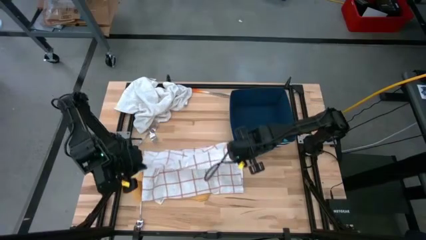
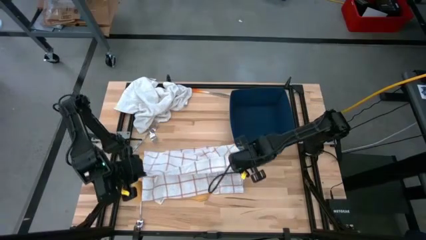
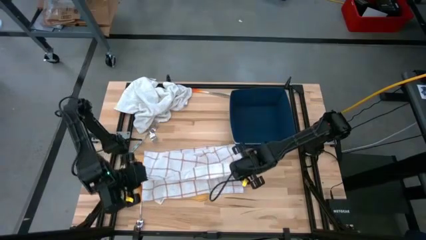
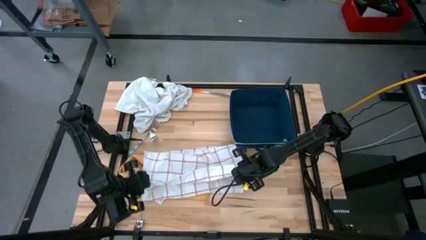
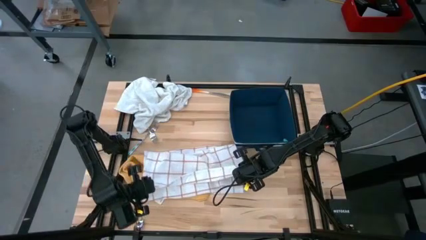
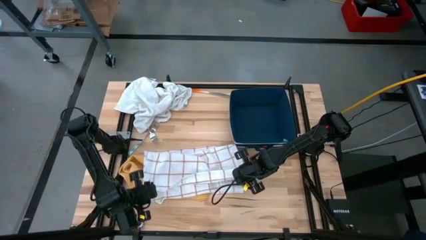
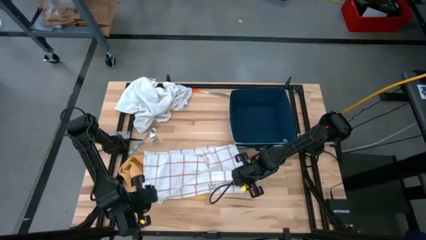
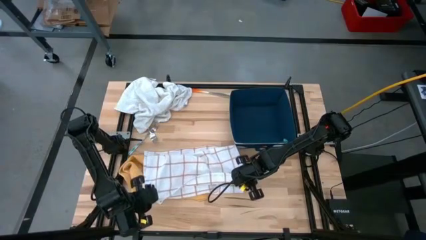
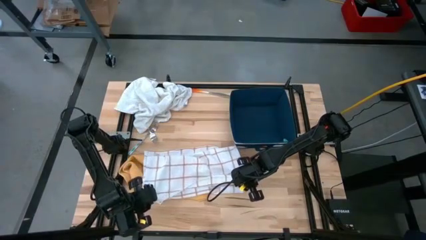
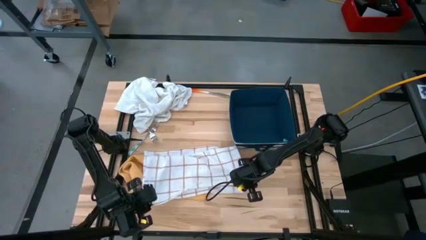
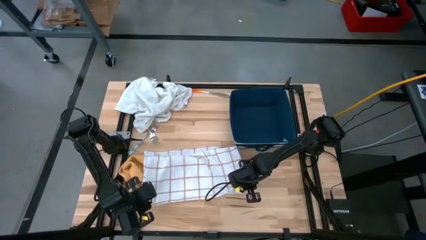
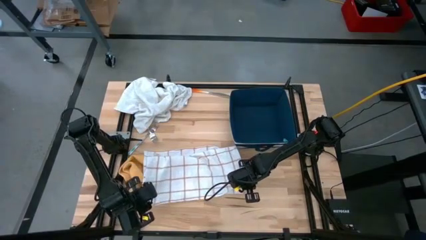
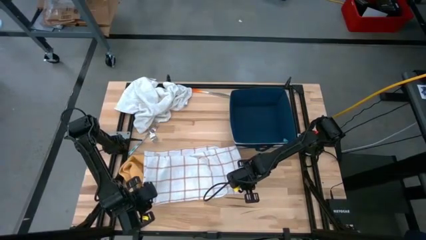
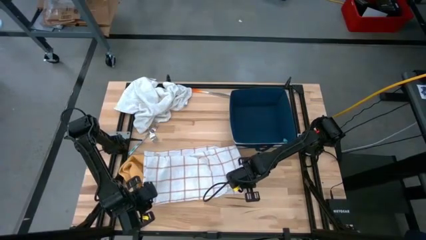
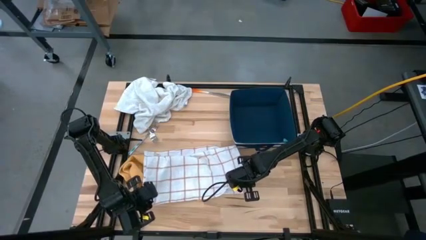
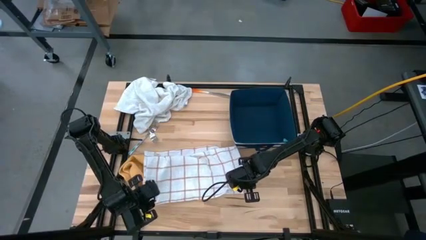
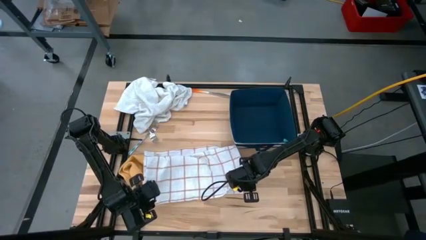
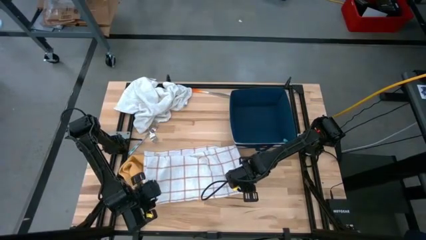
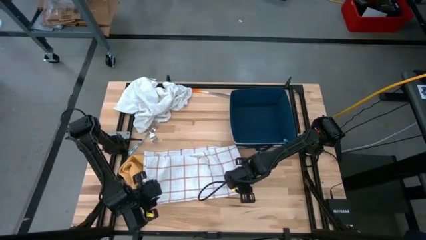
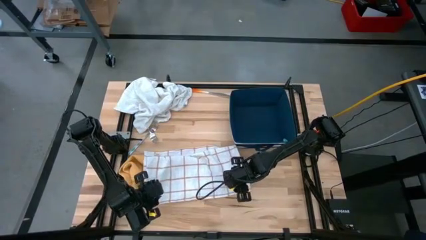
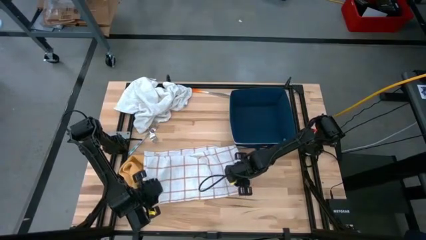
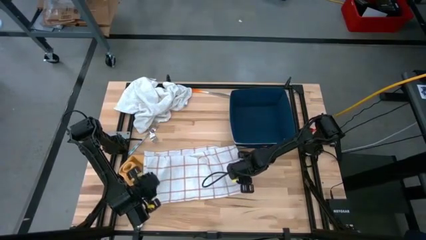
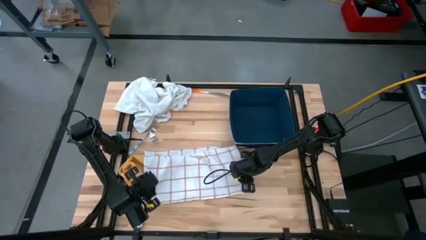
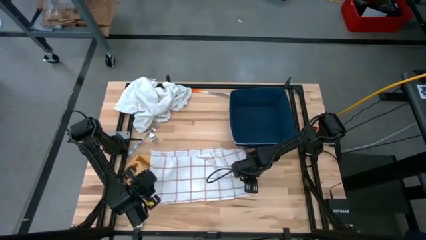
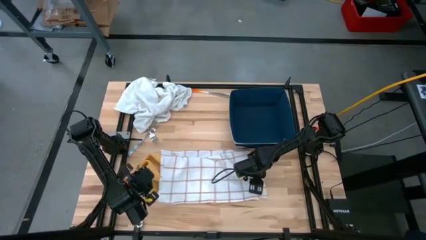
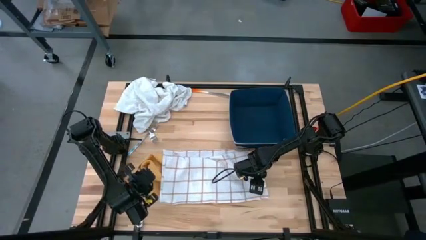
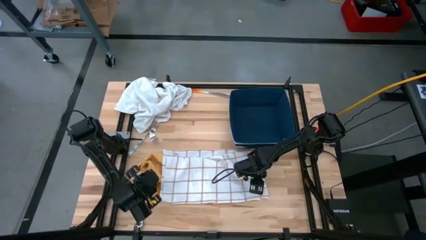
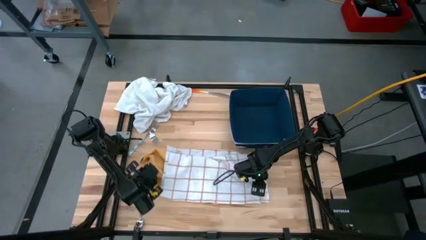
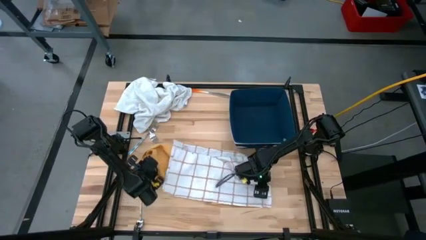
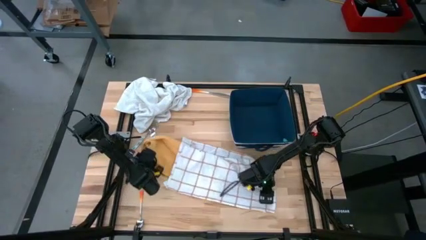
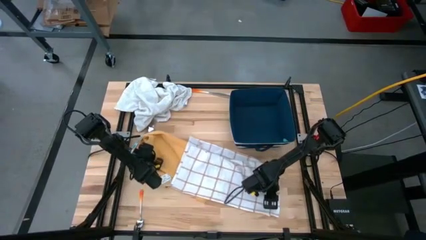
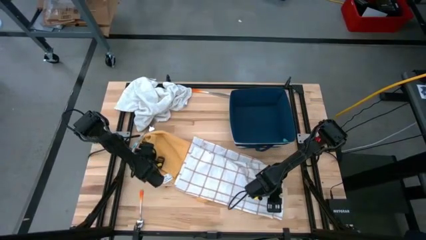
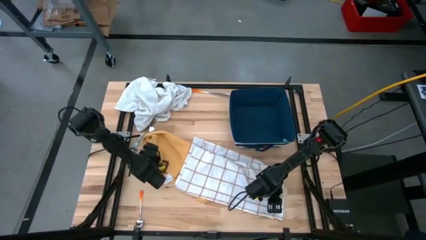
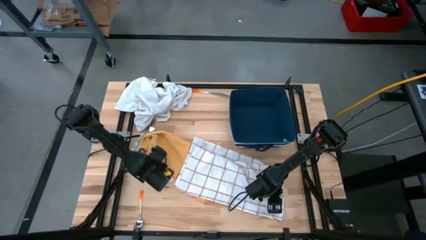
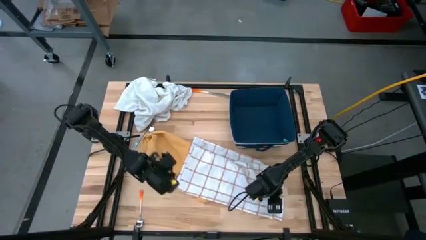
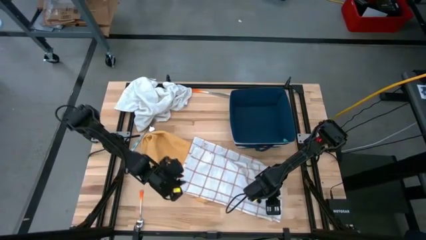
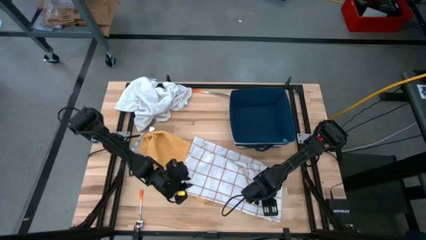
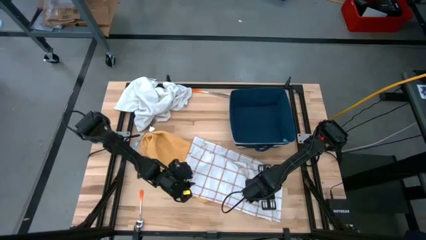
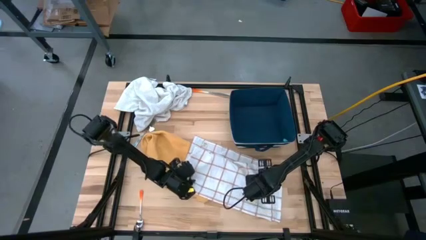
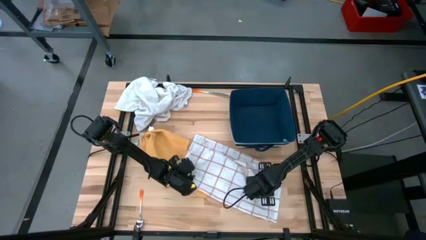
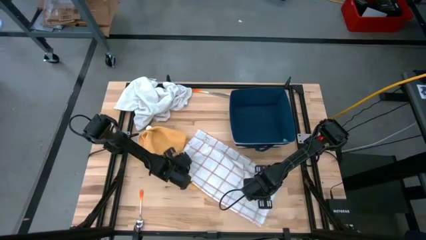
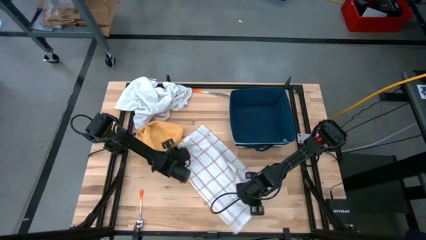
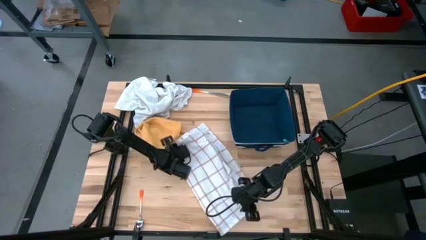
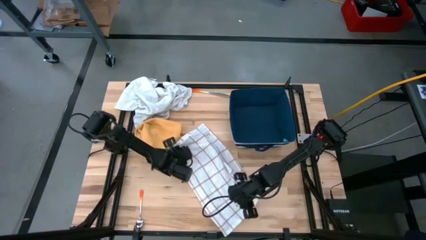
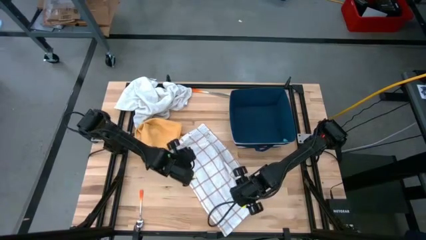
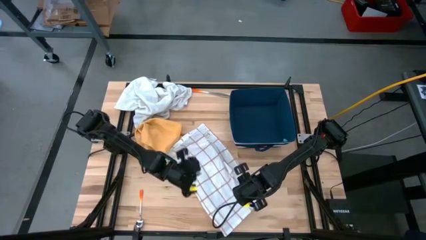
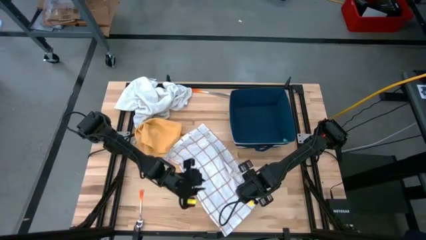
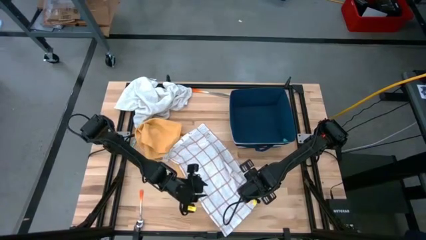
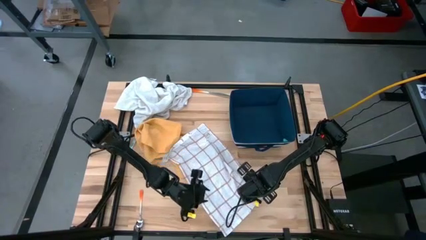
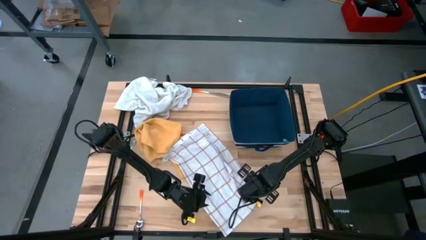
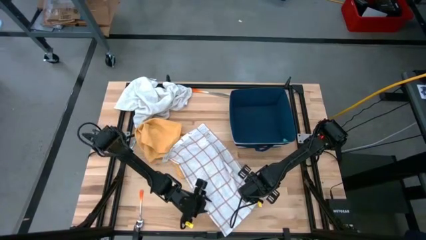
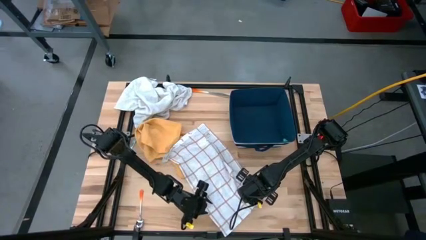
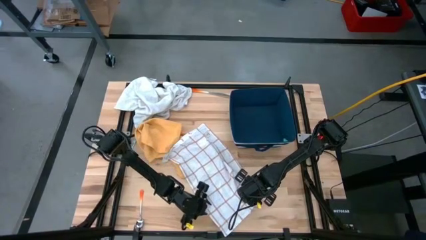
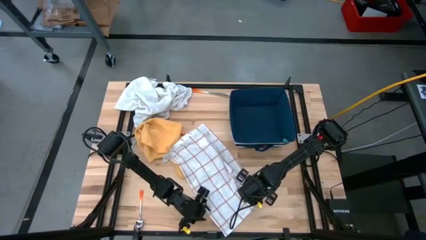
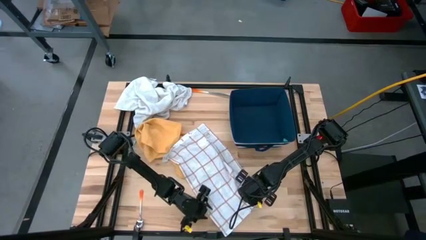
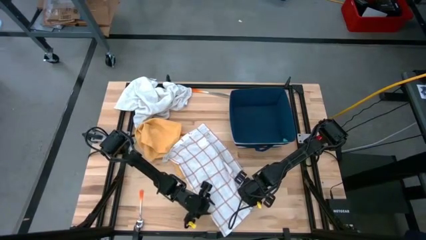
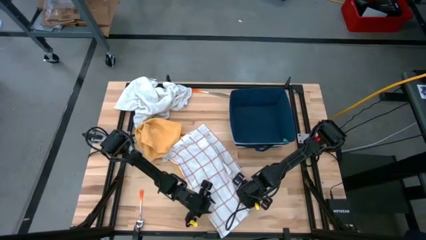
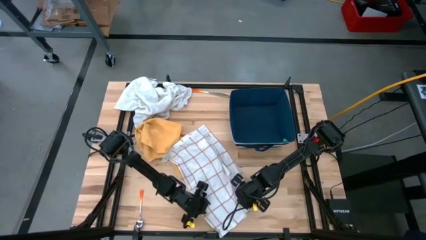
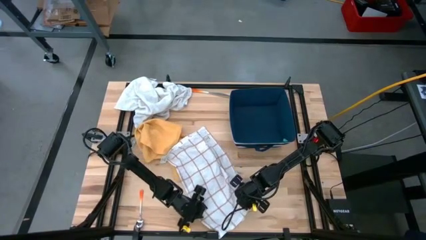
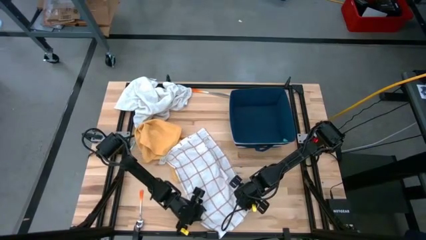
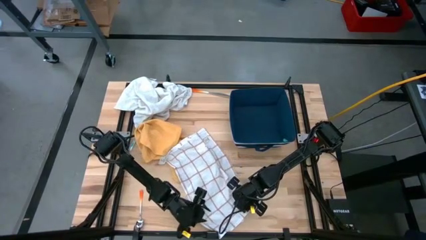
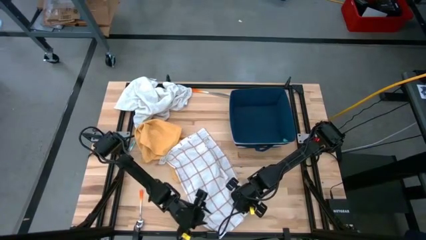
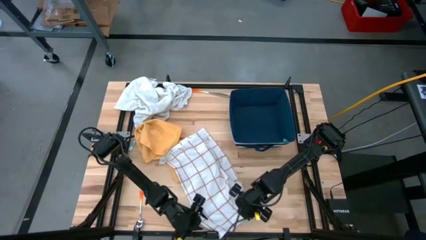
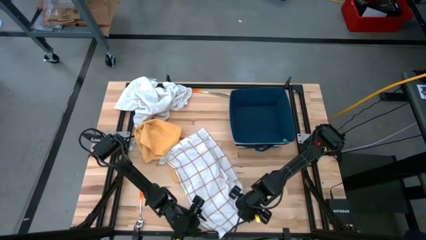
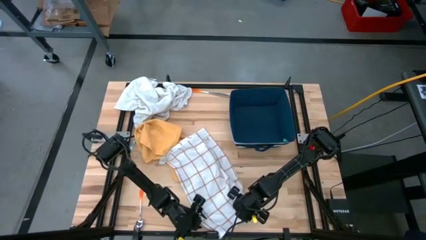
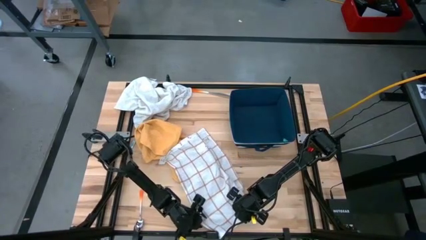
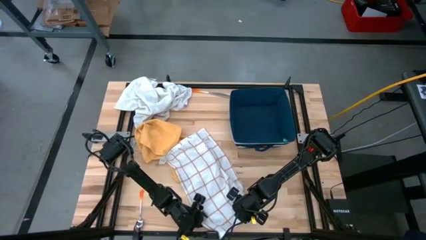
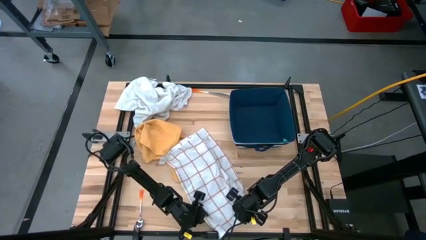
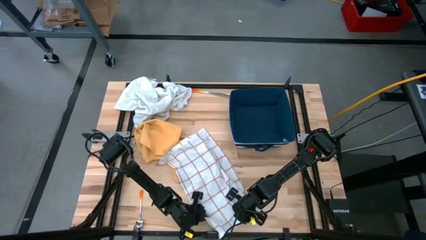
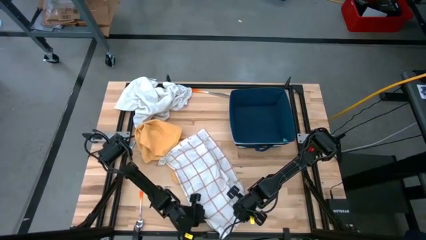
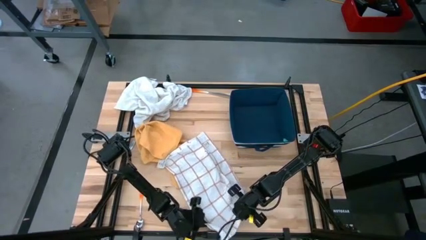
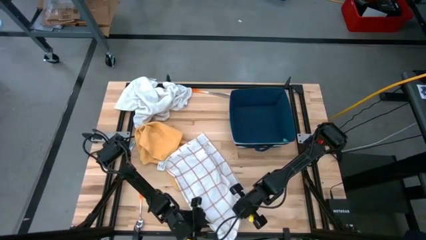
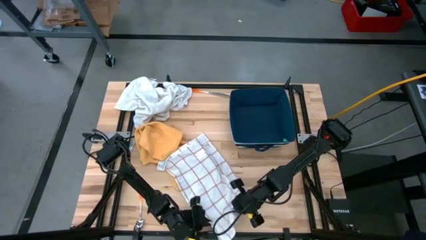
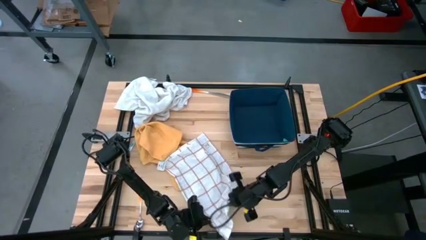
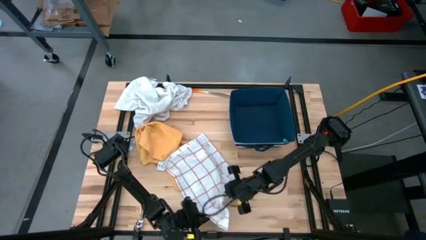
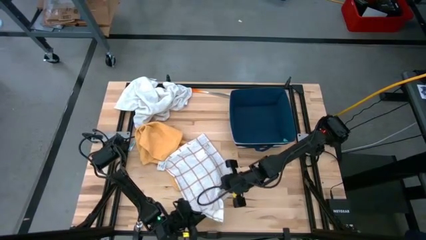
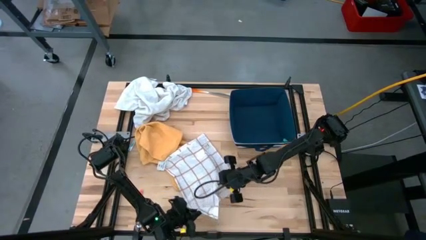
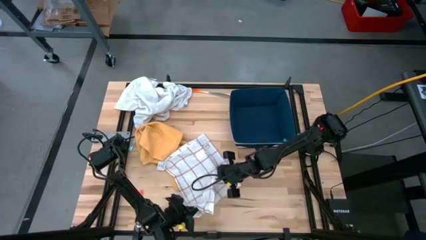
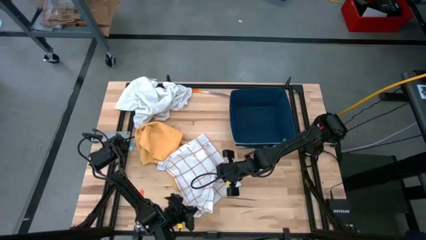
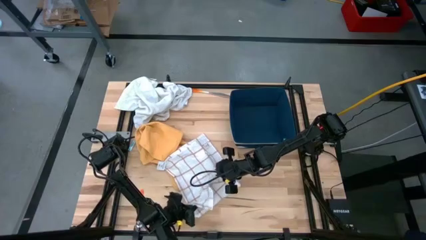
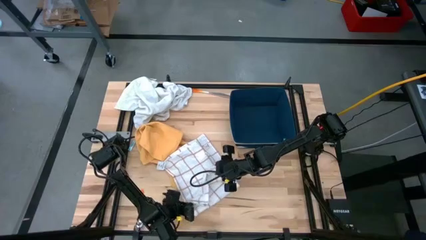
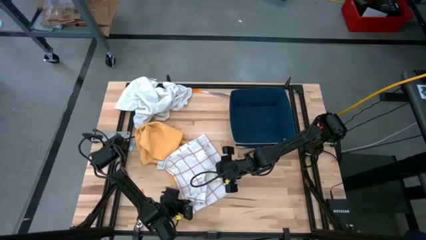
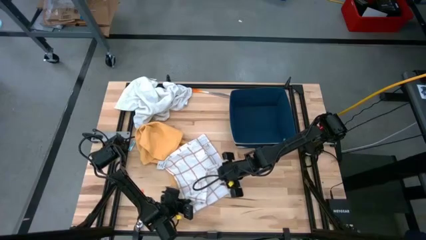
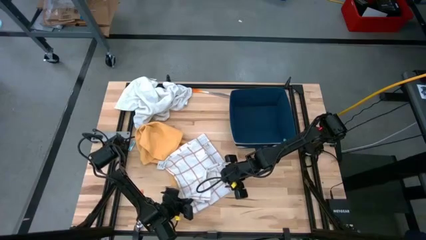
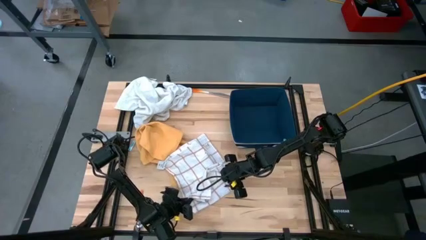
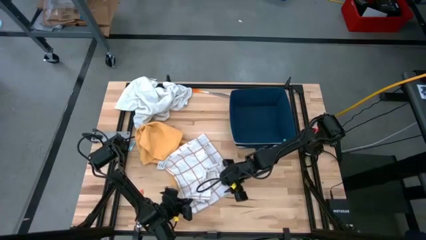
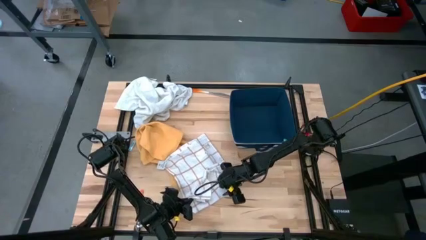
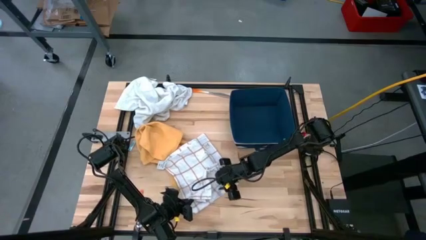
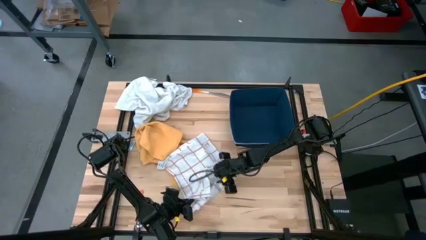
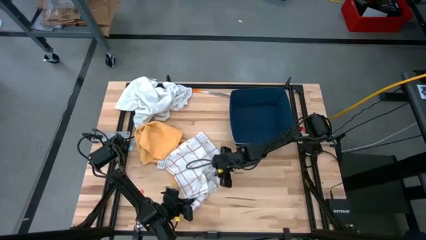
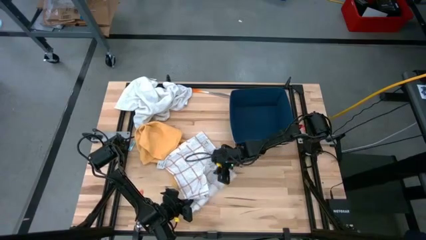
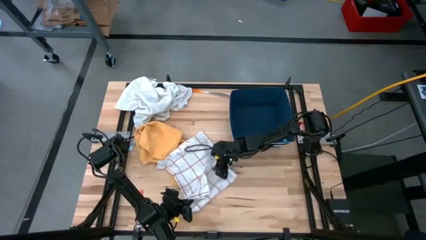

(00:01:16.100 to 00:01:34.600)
Task: Fold towel
Fold the white-and-brown checkered towel
